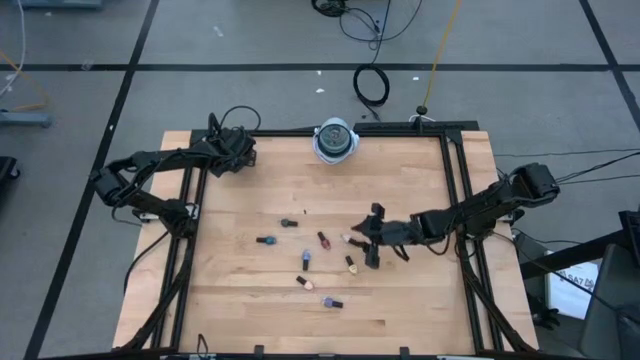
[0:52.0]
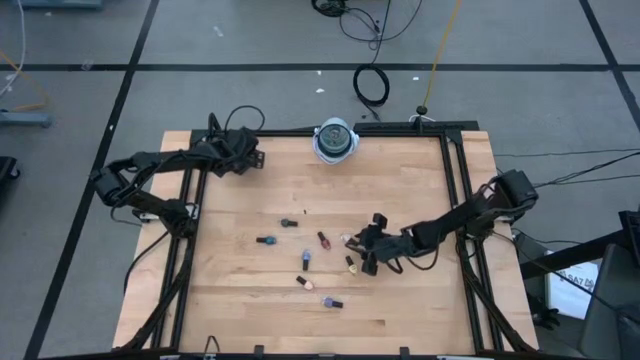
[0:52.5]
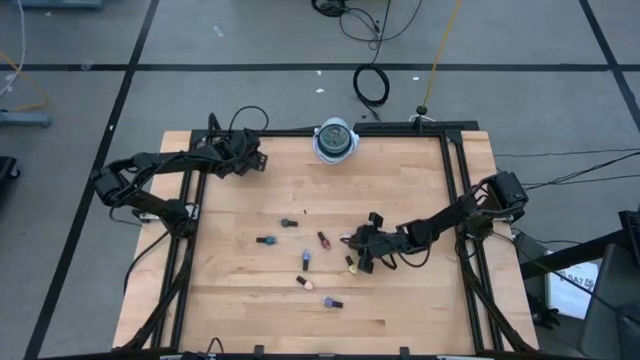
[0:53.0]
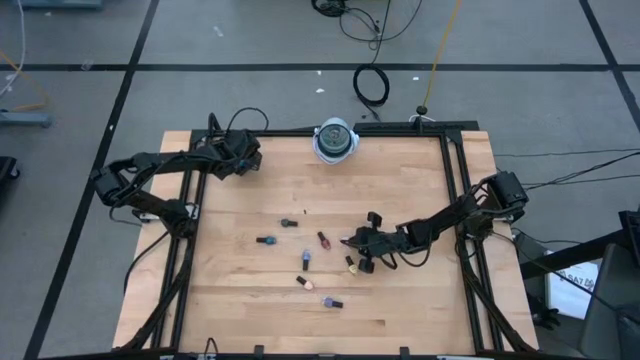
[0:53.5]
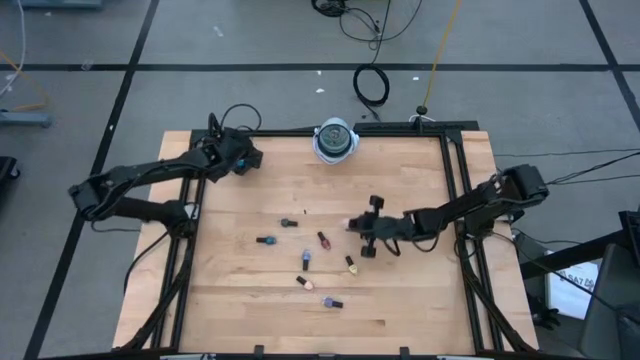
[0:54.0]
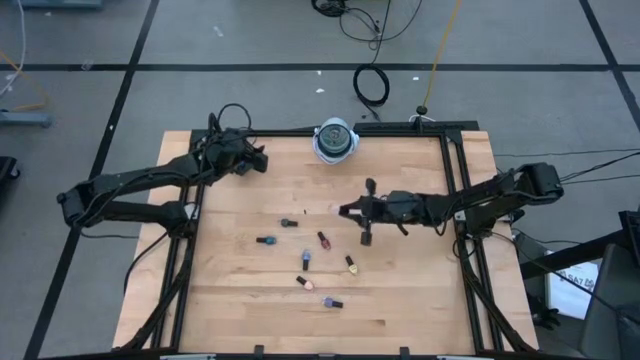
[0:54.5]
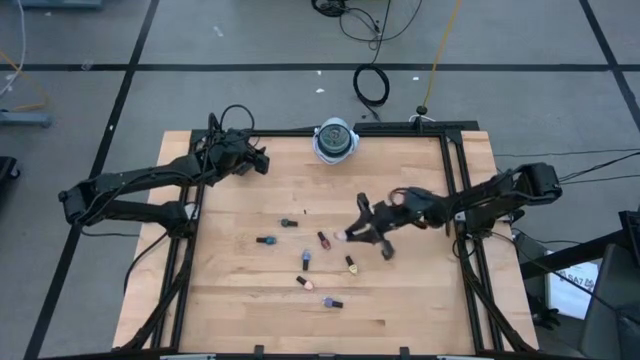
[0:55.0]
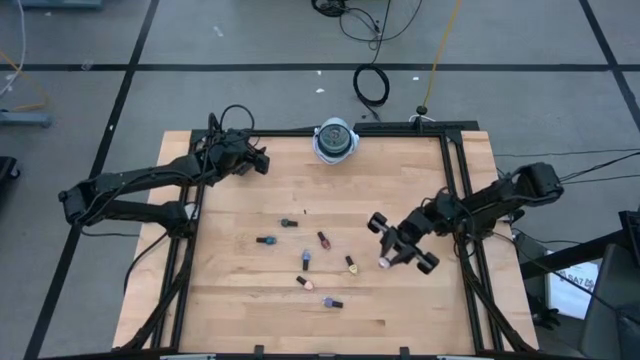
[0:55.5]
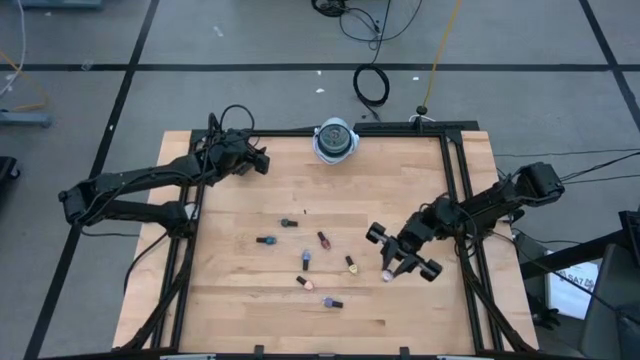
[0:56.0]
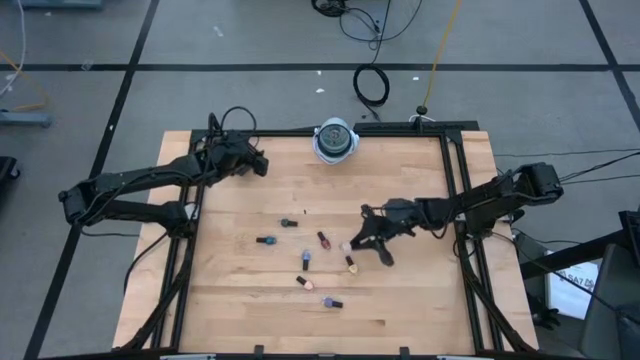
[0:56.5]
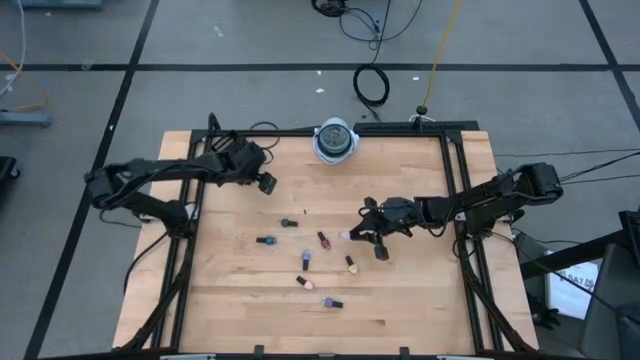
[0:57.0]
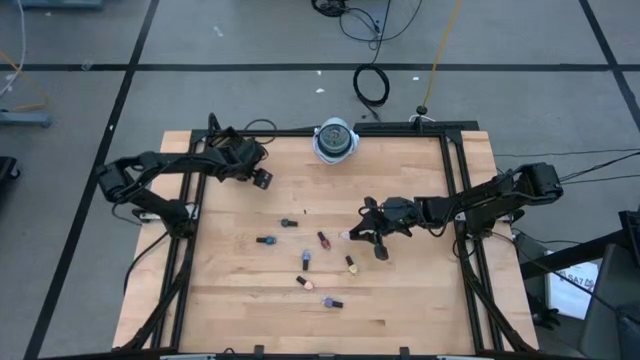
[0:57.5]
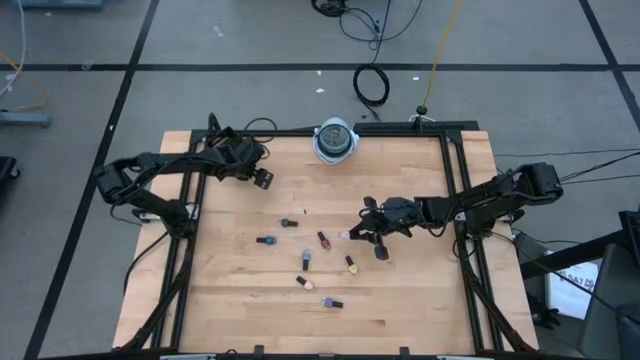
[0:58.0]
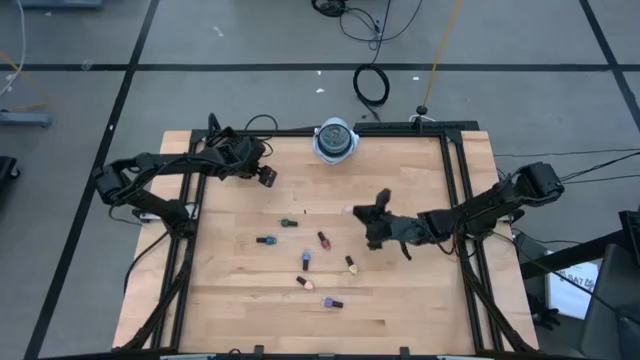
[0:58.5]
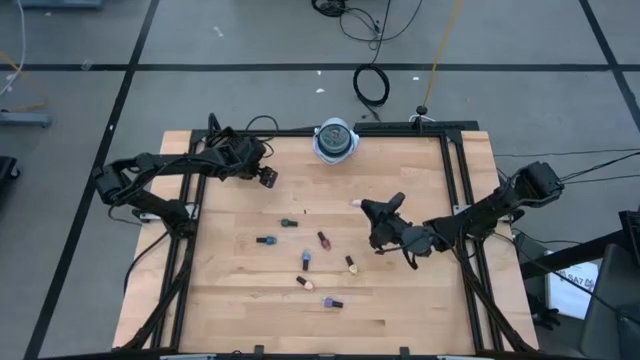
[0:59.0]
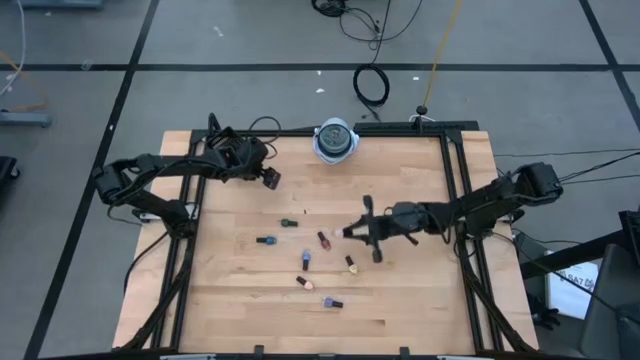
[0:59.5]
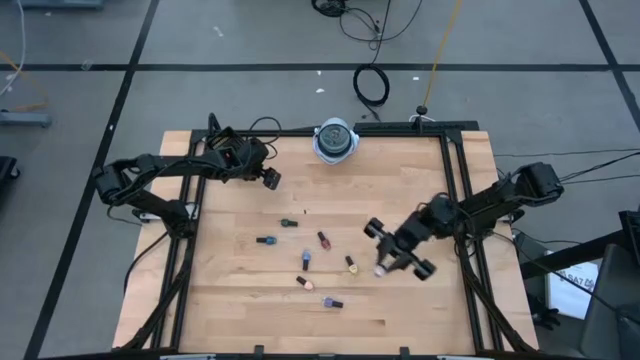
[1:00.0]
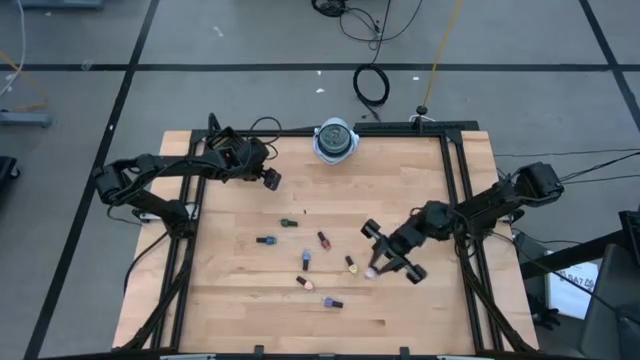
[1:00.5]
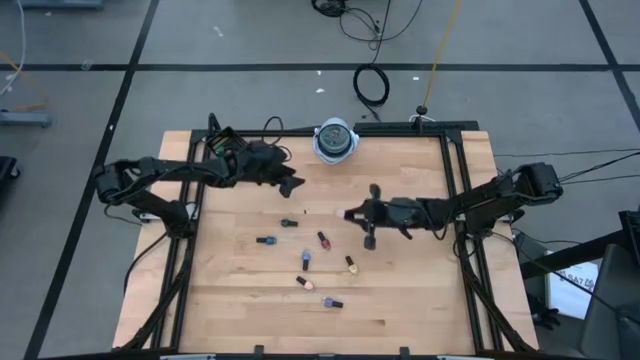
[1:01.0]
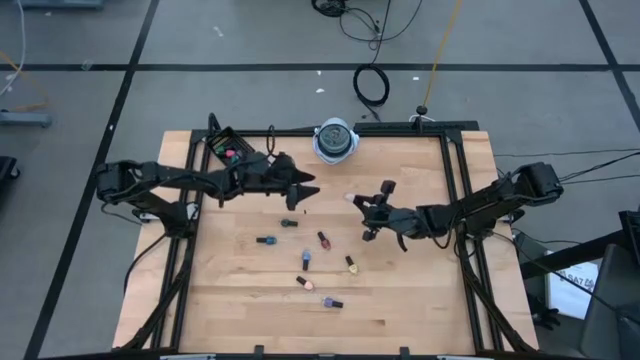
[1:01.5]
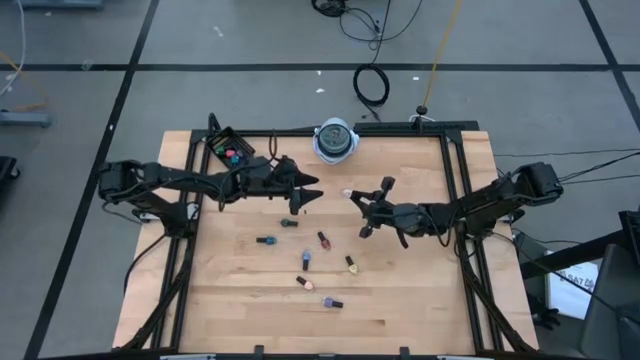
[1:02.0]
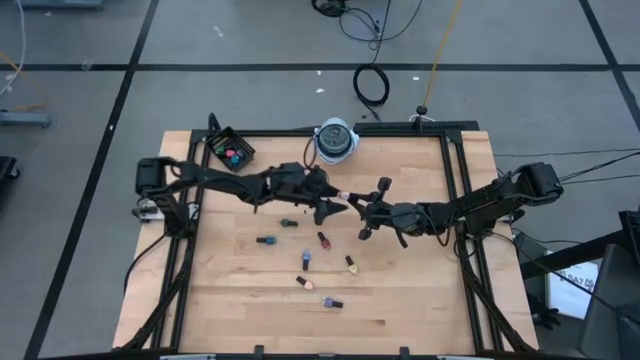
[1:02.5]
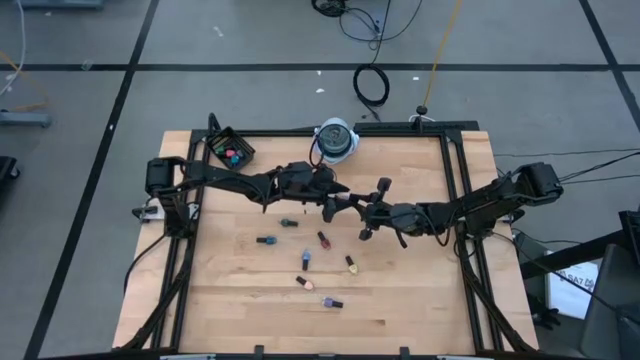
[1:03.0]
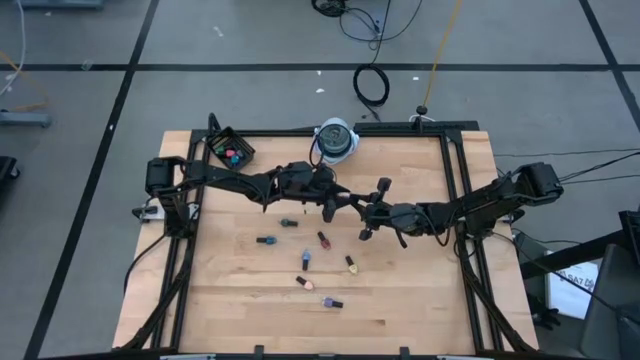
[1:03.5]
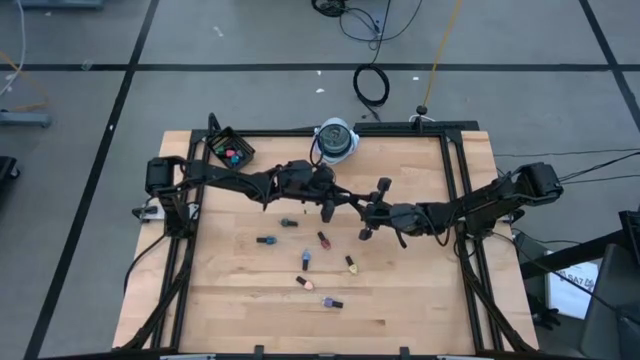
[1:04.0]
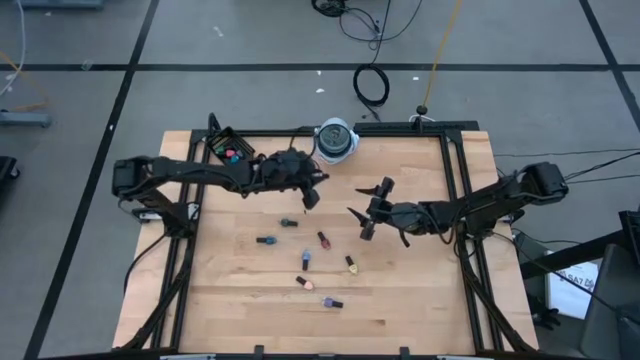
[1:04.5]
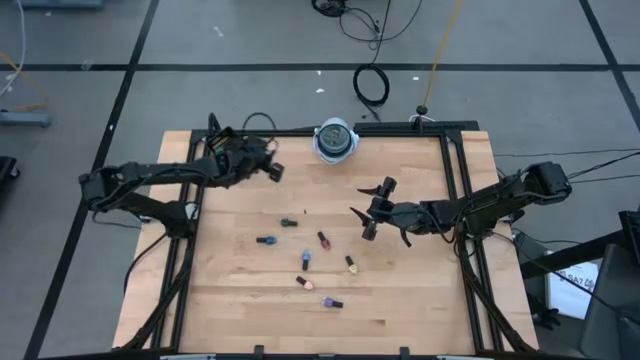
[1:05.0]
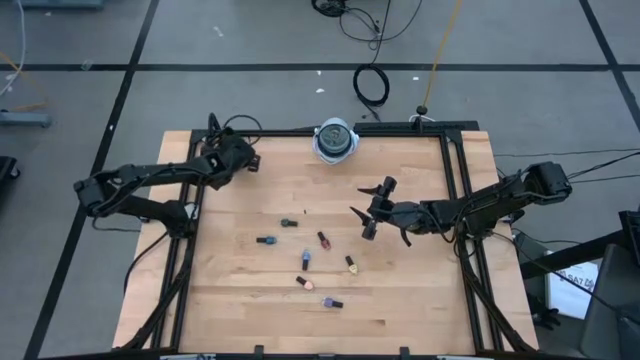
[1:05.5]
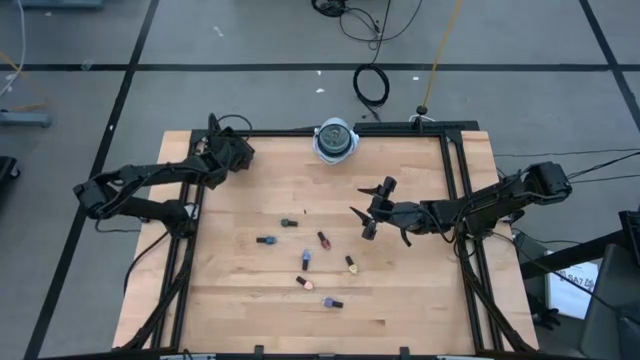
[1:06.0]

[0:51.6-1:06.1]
Task: Pick & Place Nail Polish
Put the white nail polish bottle into the black bin

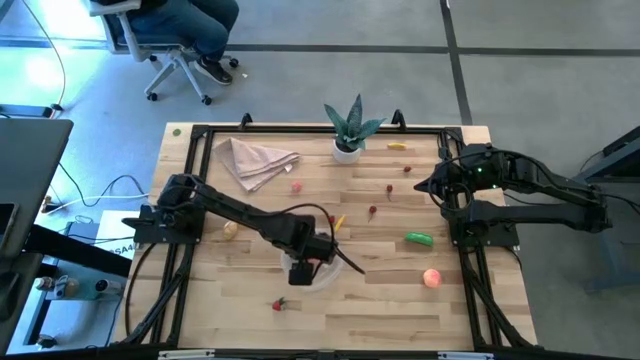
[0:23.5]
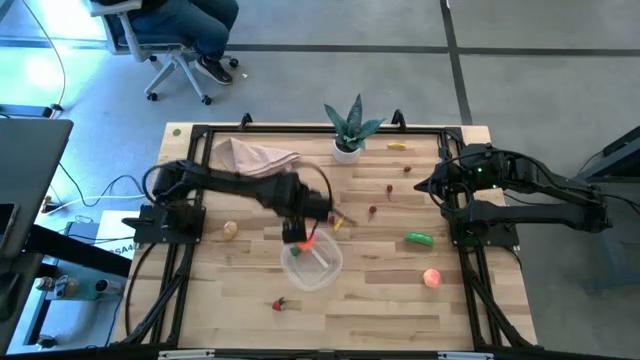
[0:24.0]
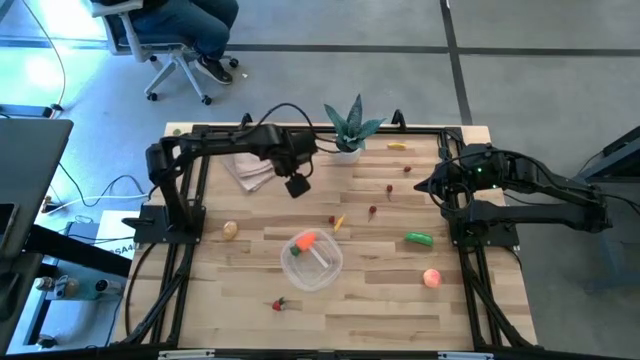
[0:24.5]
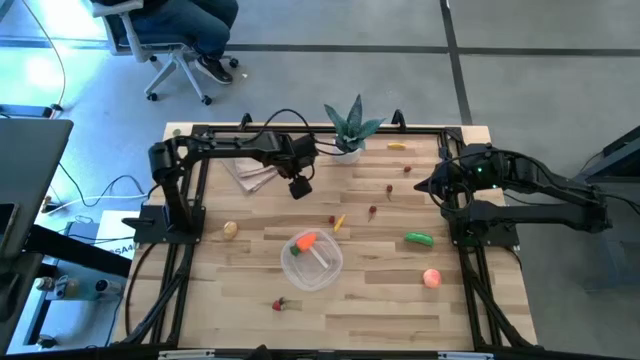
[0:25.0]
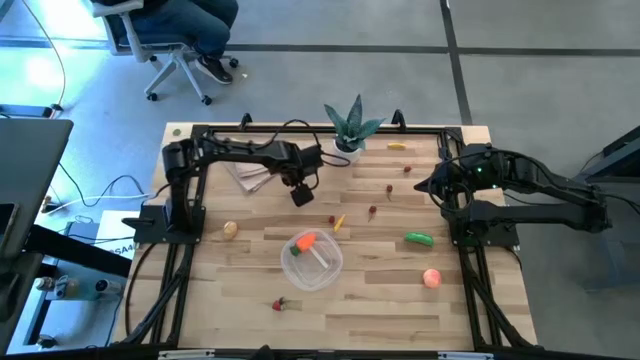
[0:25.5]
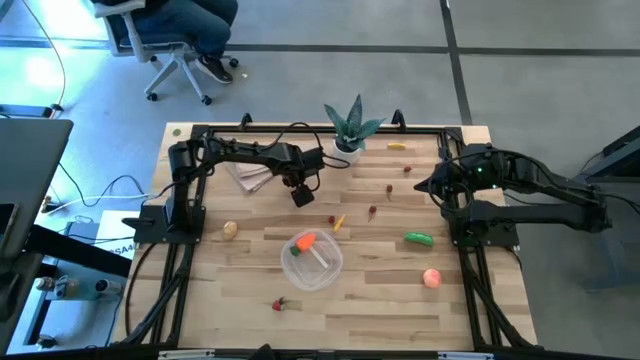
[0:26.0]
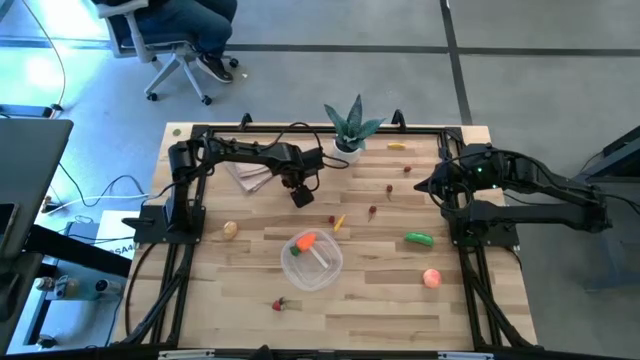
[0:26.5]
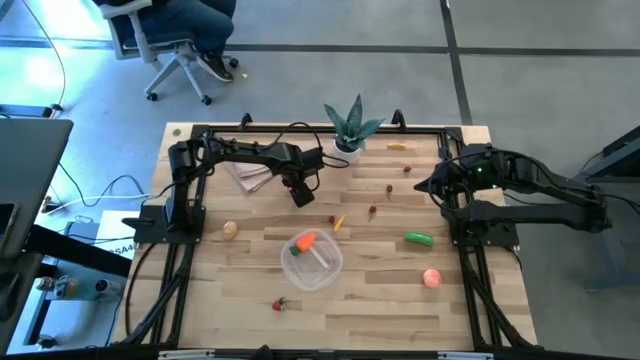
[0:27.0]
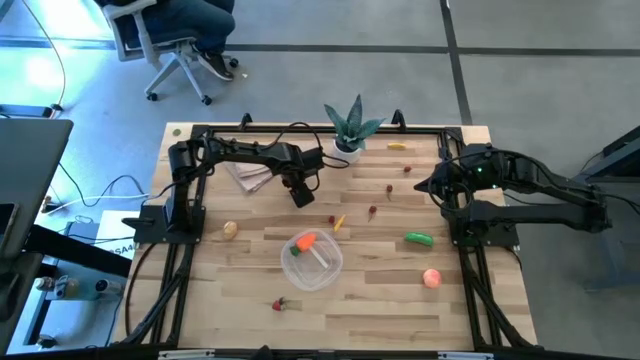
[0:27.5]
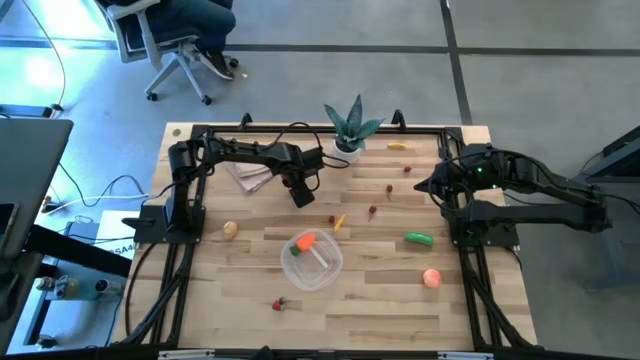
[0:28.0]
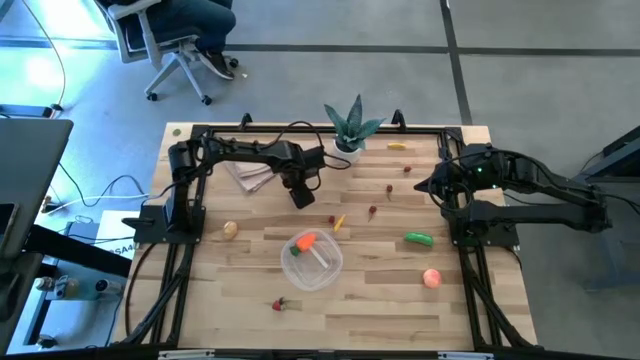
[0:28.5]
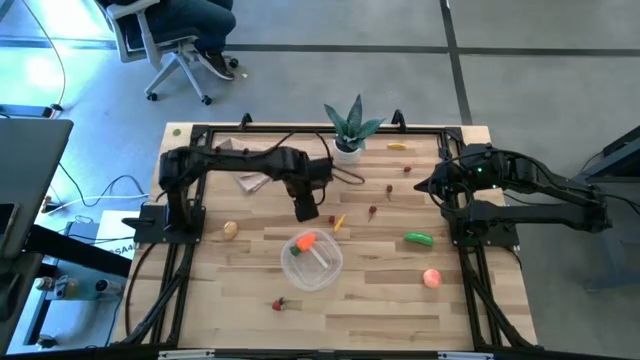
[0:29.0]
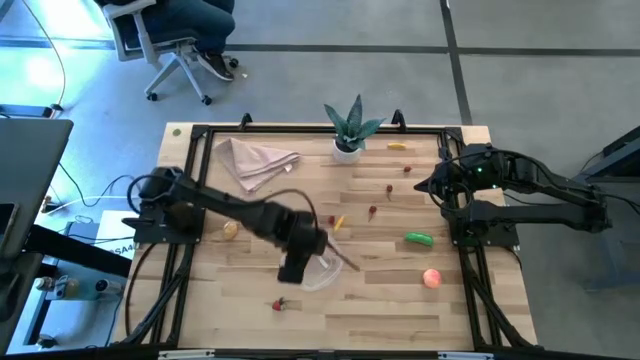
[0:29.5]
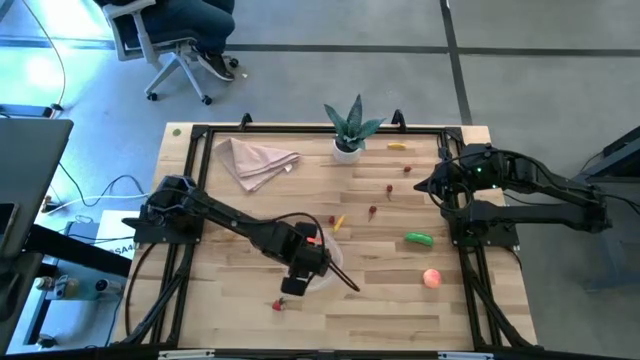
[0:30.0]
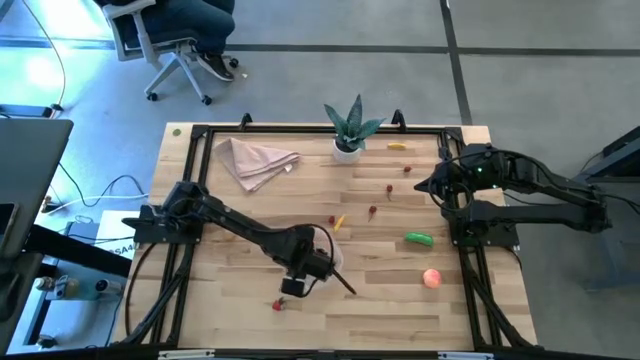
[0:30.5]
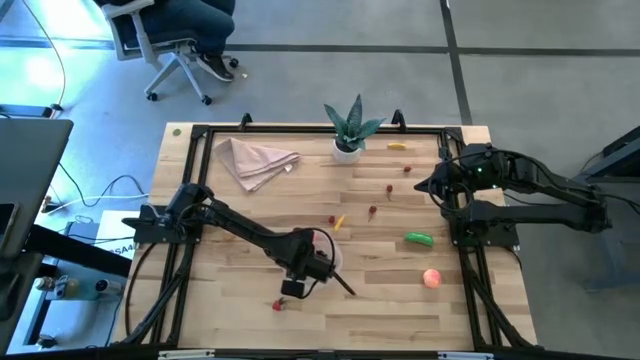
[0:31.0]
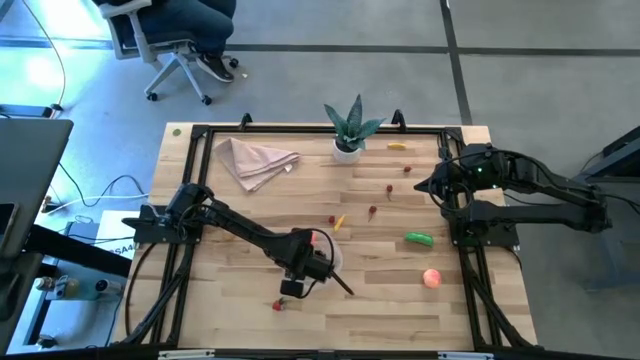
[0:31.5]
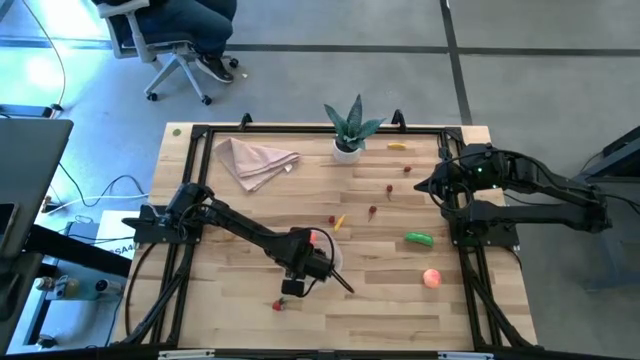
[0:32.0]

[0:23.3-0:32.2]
Task: Pick and placing Produce into tupperware
Put the apricot into the transparent container
